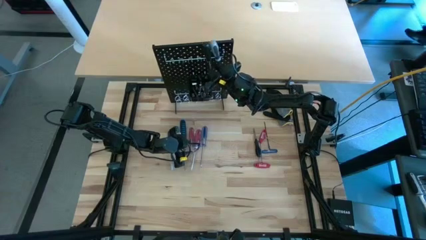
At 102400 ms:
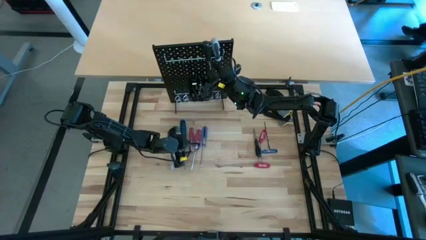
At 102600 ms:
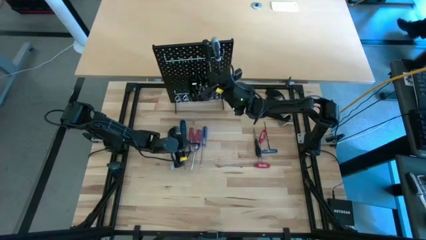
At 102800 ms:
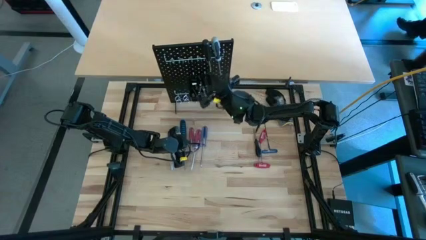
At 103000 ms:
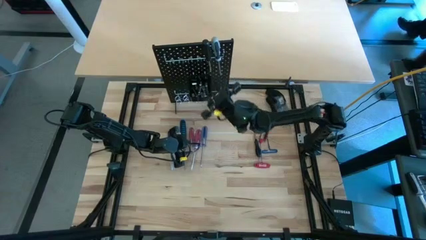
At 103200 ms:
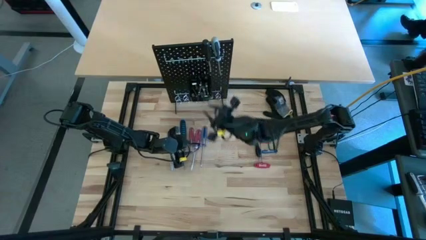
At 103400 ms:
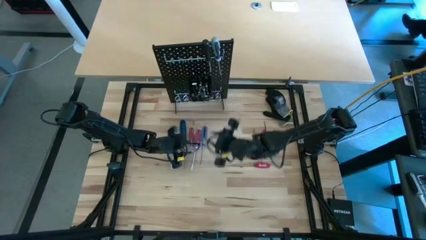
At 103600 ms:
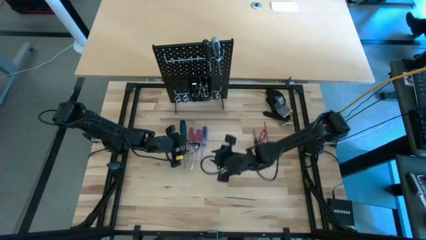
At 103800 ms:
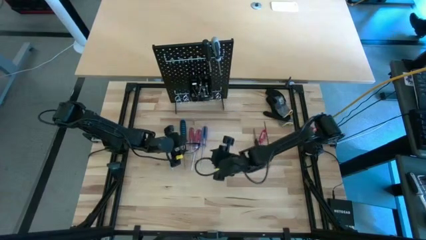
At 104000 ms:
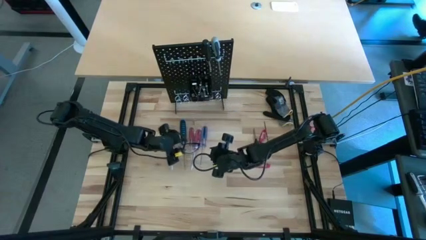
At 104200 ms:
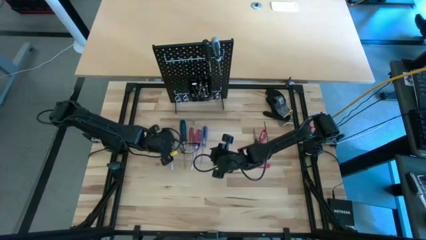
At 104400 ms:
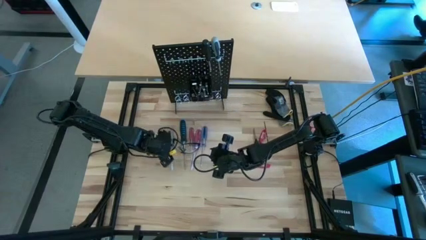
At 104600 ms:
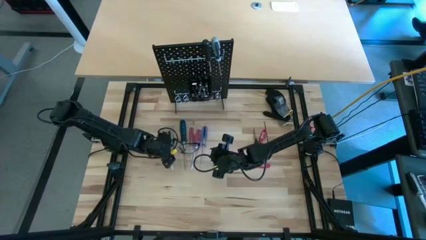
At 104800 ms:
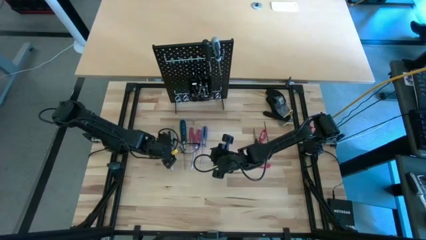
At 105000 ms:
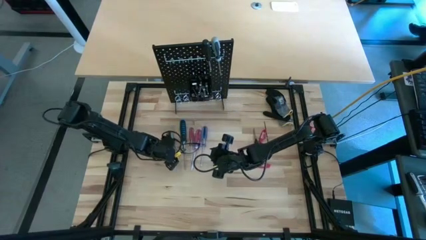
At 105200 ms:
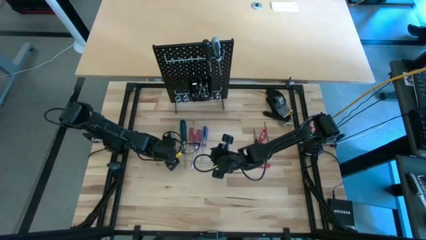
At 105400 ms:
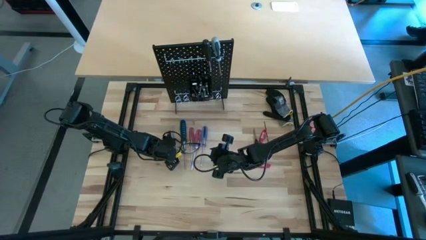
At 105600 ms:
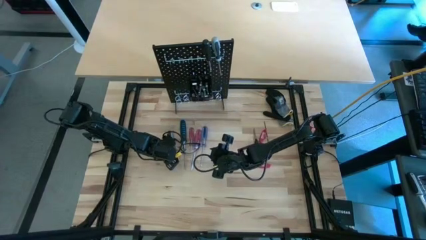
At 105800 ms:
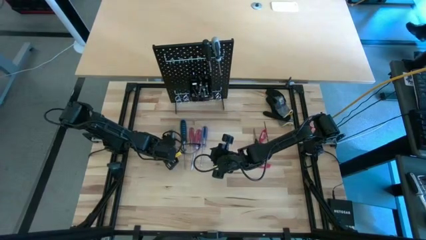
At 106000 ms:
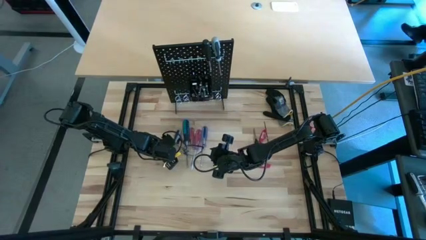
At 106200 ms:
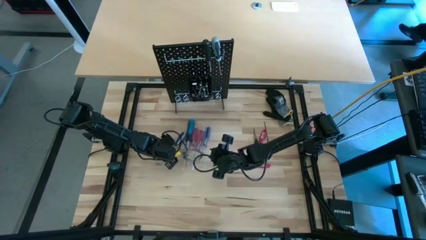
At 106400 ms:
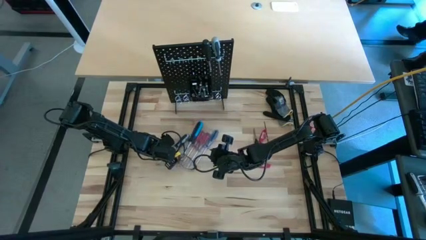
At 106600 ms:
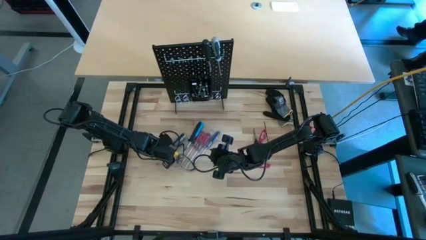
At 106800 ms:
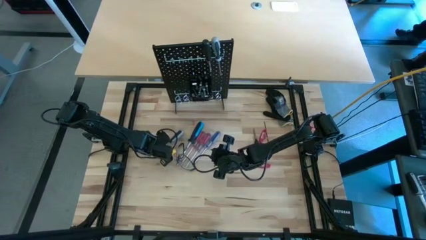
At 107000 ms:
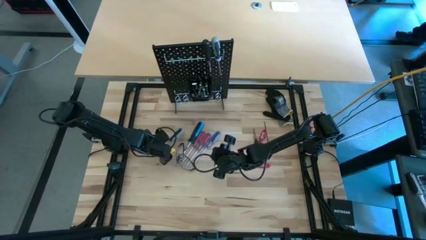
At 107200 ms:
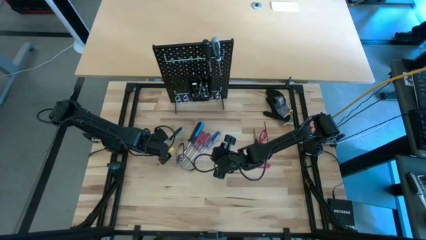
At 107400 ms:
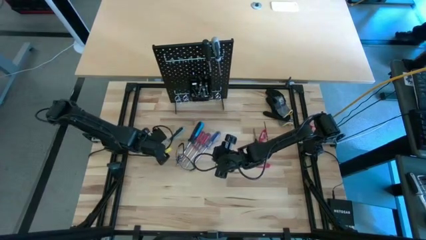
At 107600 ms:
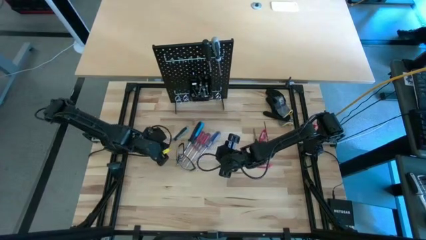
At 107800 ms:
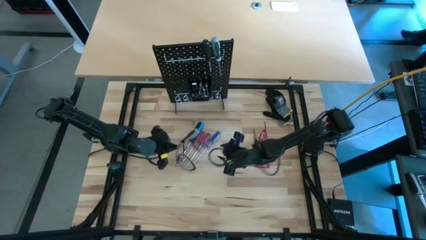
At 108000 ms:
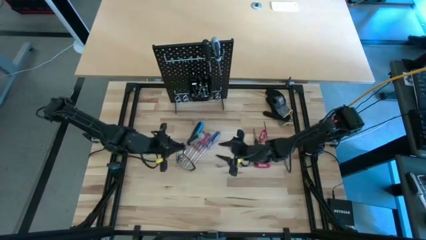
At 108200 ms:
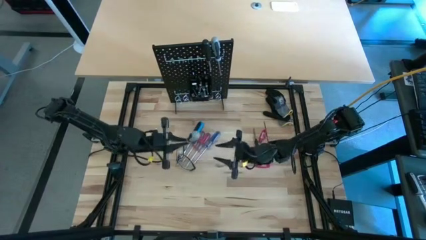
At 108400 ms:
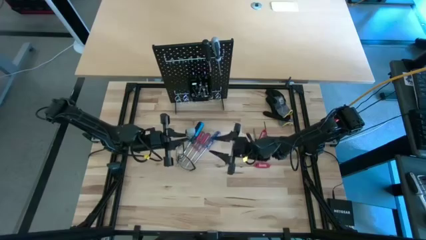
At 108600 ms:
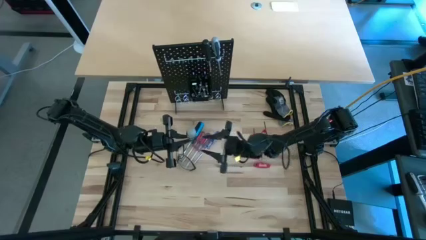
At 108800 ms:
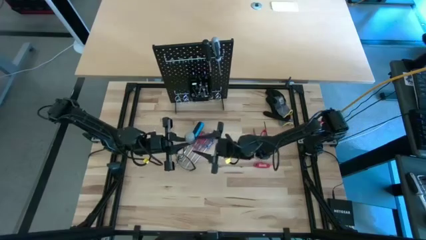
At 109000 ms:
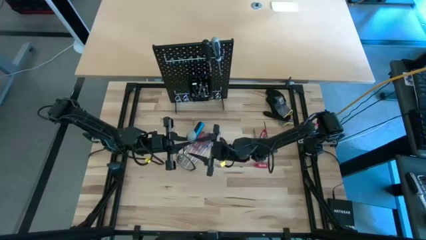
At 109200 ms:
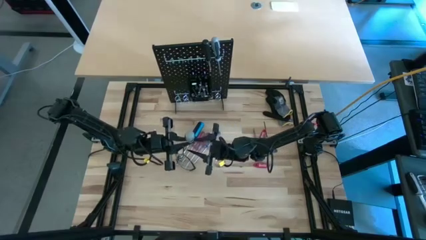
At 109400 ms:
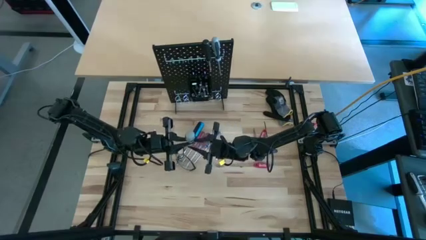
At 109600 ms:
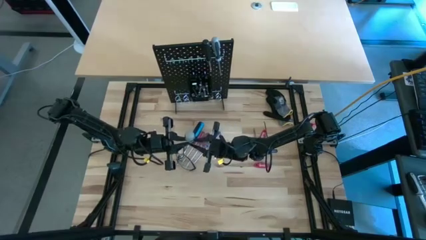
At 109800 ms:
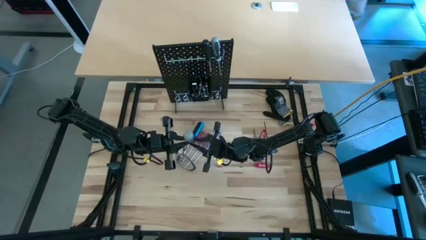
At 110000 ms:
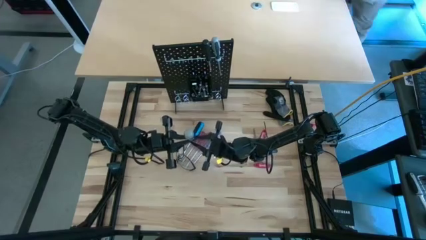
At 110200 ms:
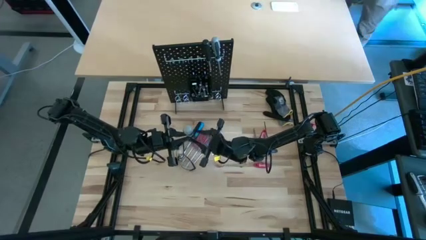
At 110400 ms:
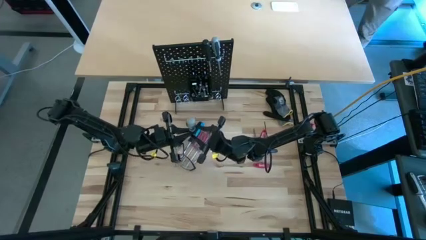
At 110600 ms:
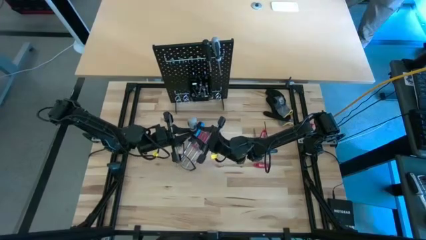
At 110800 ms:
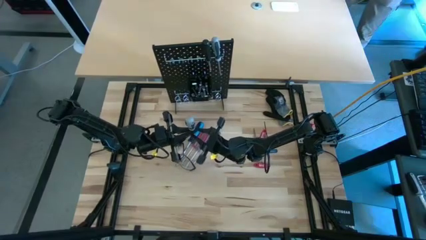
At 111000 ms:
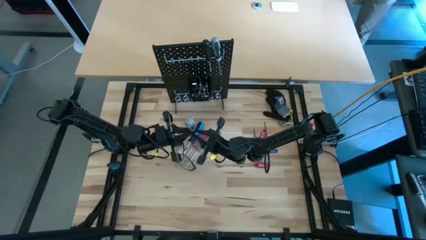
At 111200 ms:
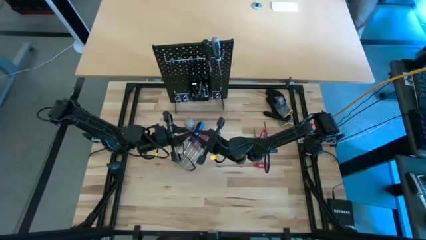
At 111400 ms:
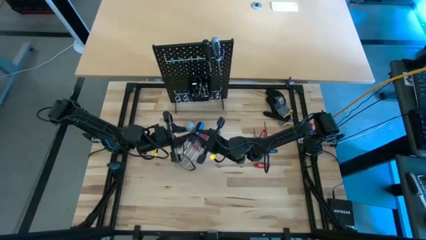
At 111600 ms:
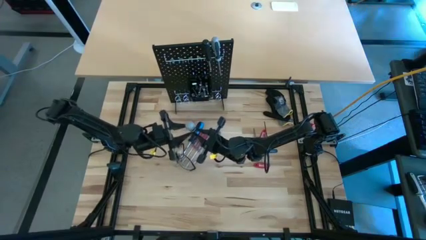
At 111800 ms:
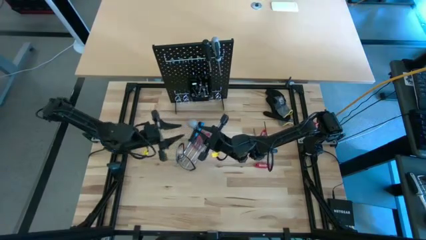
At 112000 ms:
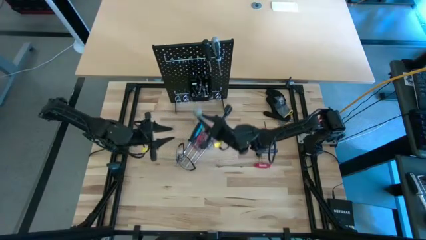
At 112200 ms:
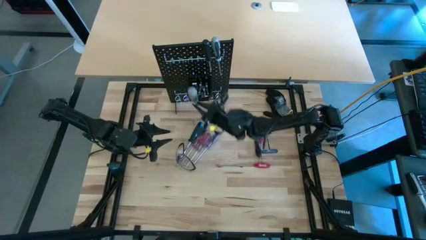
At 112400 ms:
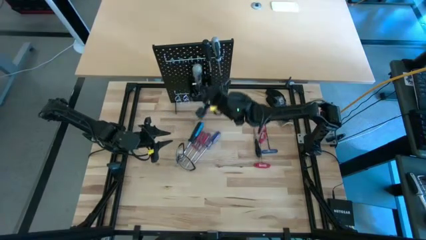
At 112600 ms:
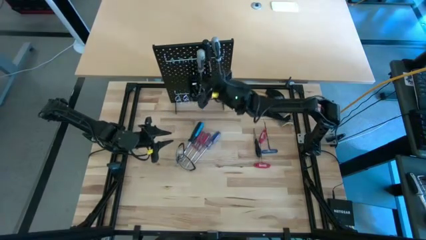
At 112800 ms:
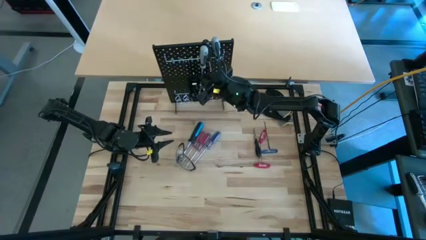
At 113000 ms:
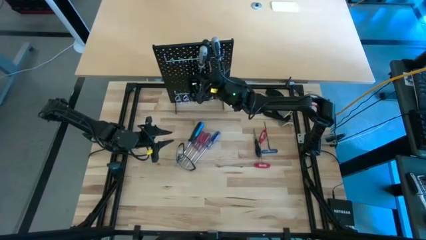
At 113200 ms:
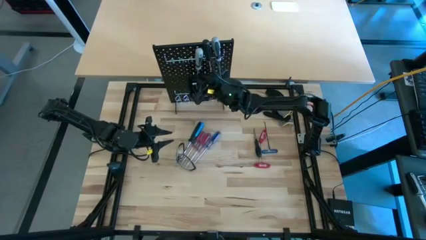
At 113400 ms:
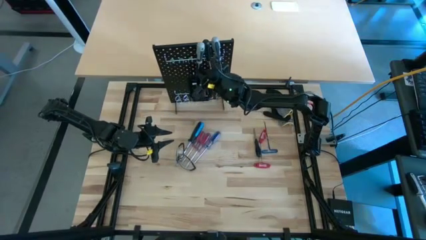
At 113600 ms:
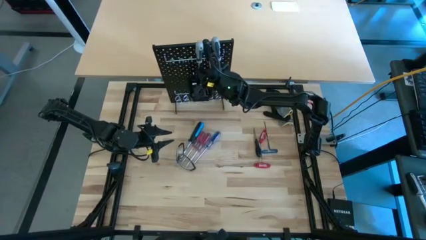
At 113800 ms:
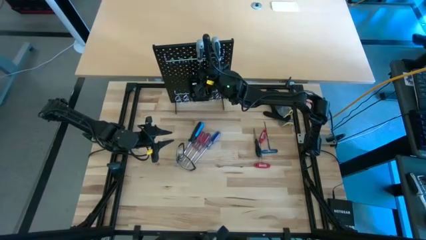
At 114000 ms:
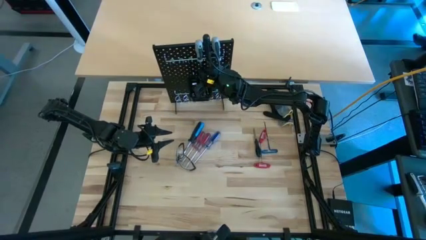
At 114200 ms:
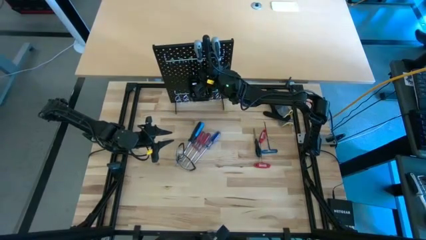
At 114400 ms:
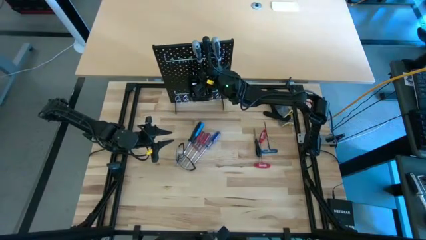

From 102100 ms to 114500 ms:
Task: Hang tools onto peg board
Hang the black and grey nut driver on the peg board

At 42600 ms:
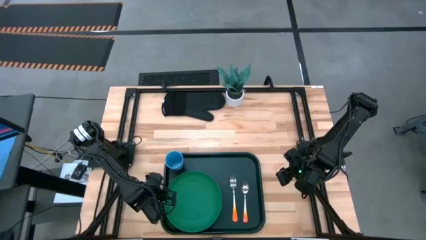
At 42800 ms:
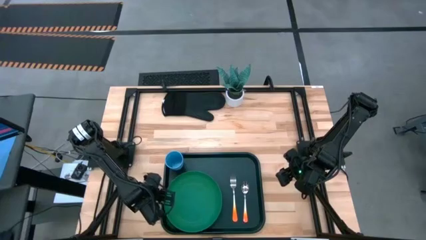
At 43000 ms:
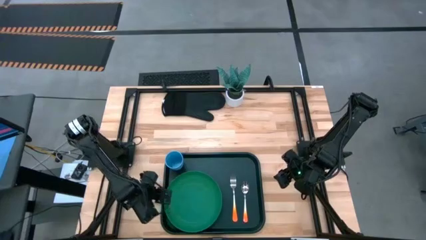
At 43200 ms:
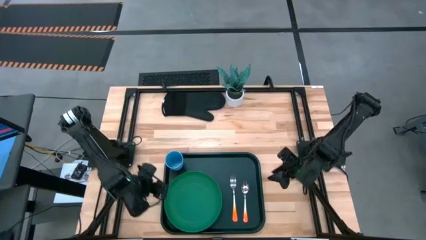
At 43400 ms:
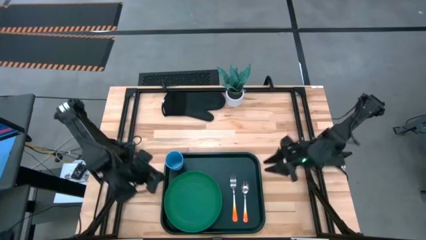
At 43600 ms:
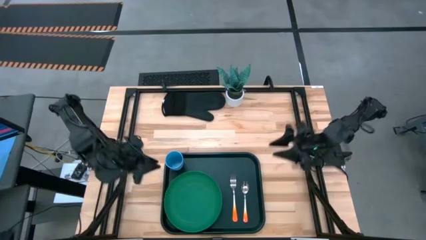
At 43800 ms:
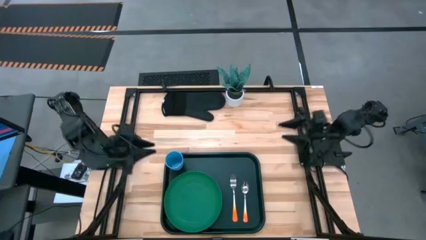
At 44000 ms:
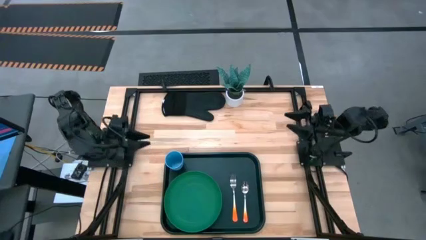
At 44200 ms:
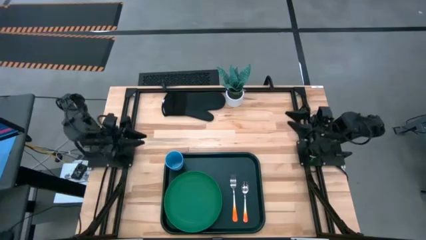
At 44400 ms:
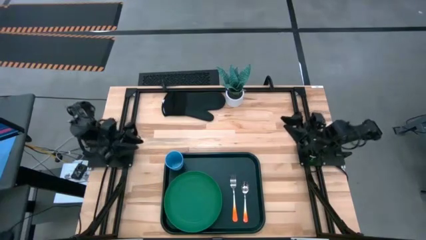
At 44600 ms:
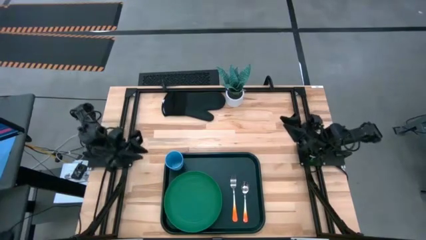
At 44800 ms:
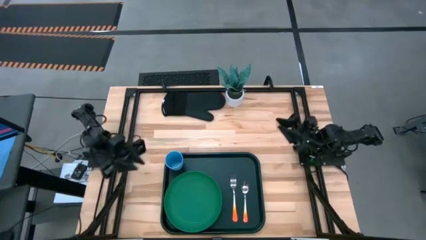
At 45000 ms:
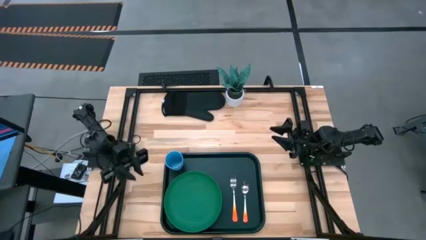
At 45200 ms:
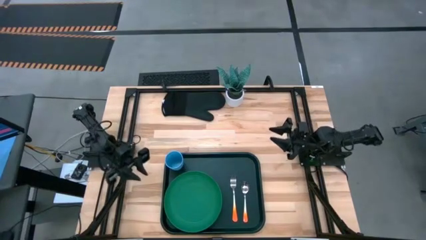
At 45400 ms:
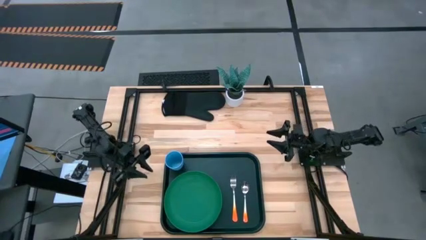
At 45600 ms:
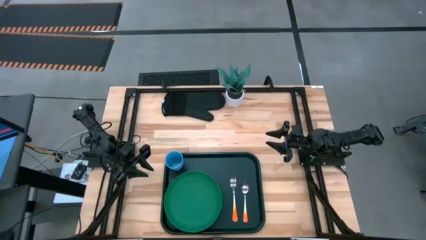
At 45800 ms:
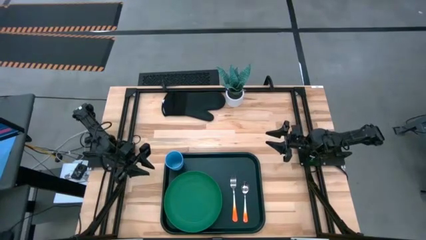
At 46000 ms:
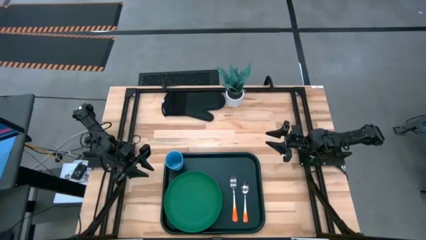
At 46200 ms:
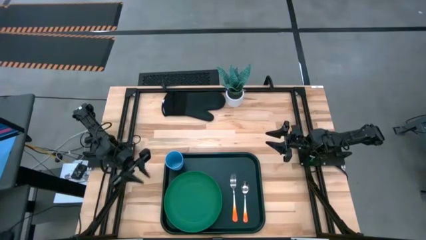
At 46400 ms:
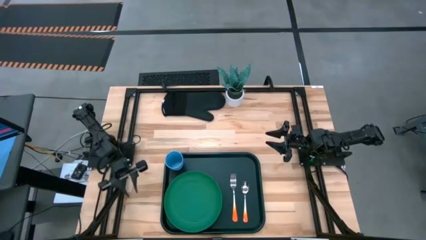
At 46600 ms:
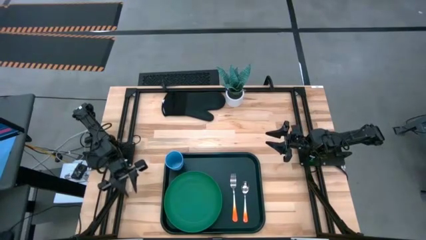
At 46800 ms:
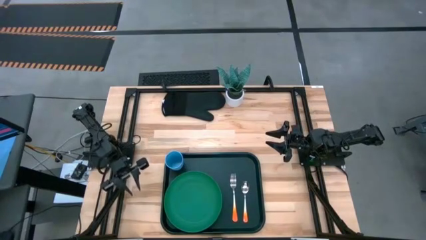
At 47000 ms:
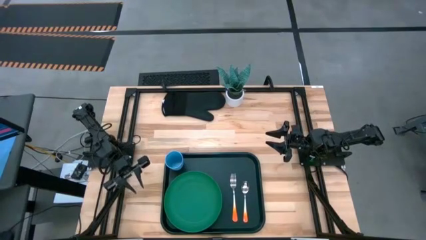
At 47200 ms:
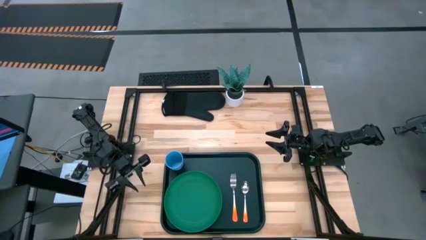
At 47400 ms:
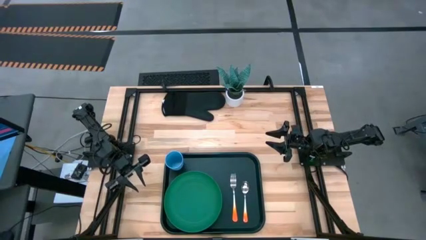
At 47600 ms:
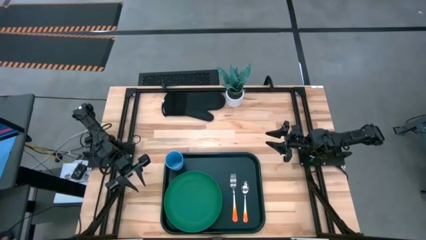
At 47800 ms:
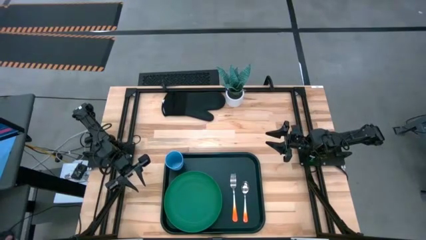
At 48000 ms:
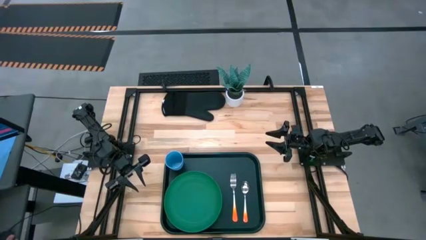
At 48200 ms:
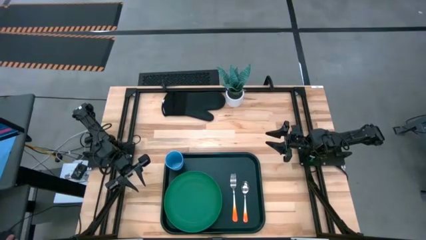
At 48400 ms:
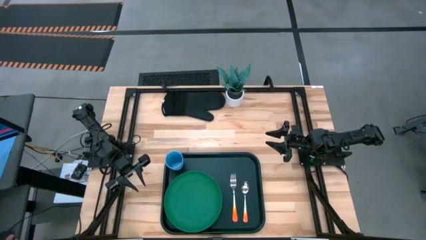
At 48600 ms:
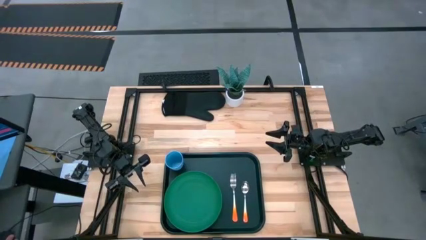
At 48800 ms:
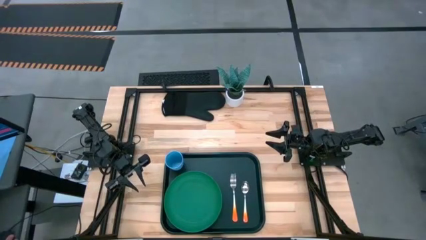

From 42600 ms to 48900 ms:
Task: Pick and place plate/cup/fork/spoon on tray
Return to Home Position
